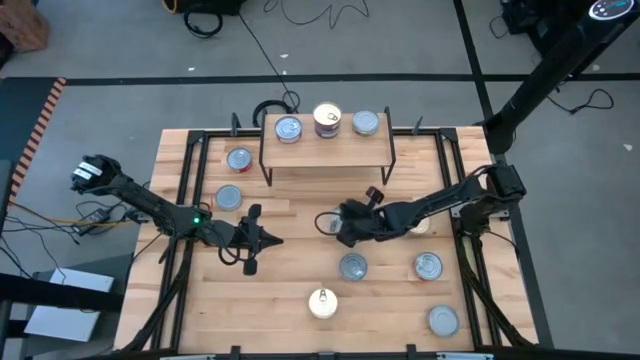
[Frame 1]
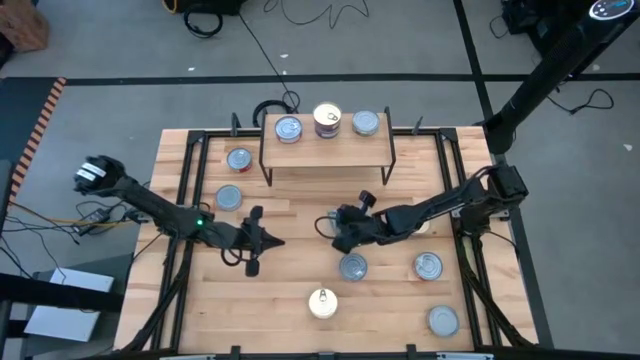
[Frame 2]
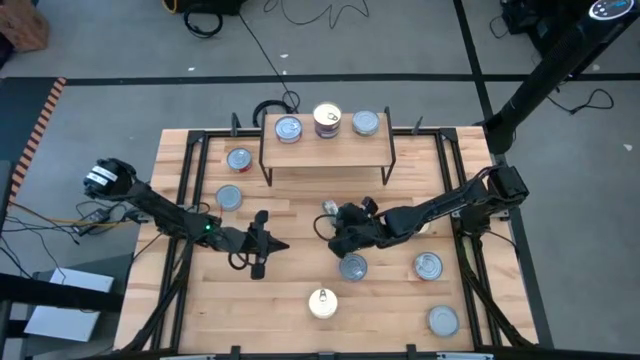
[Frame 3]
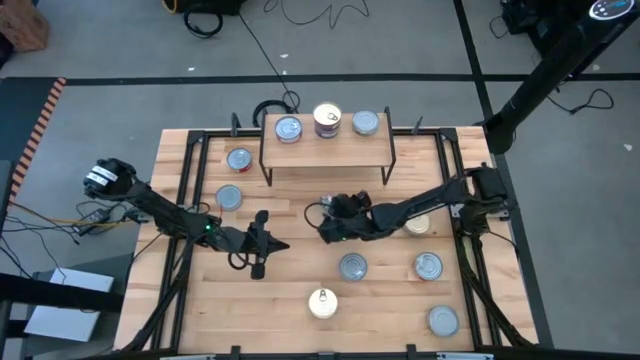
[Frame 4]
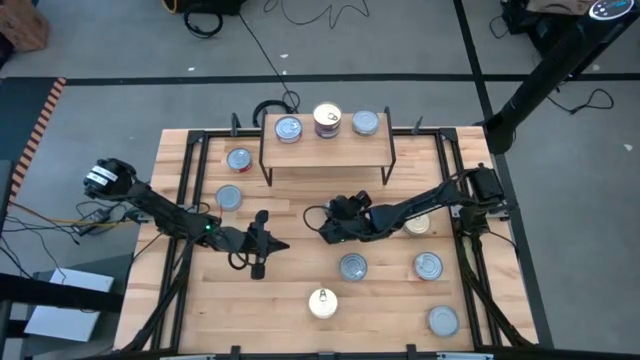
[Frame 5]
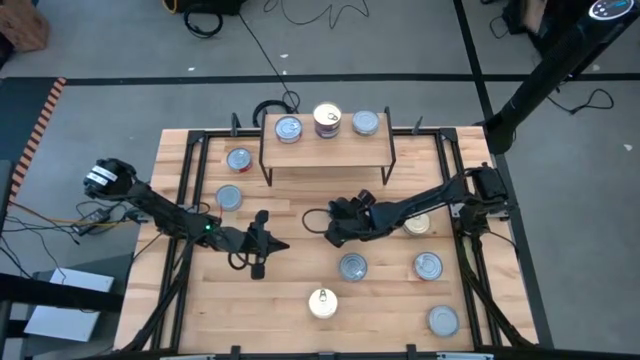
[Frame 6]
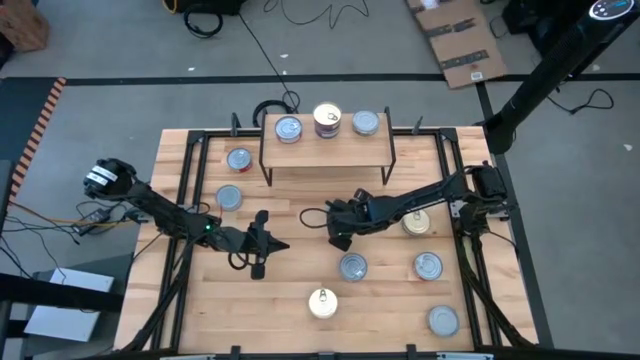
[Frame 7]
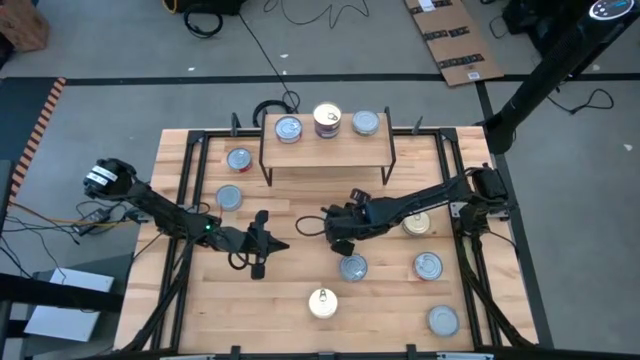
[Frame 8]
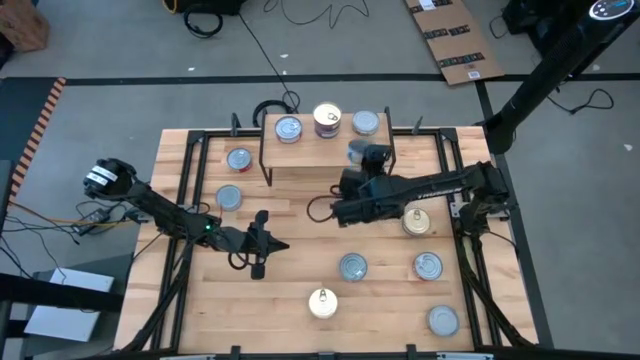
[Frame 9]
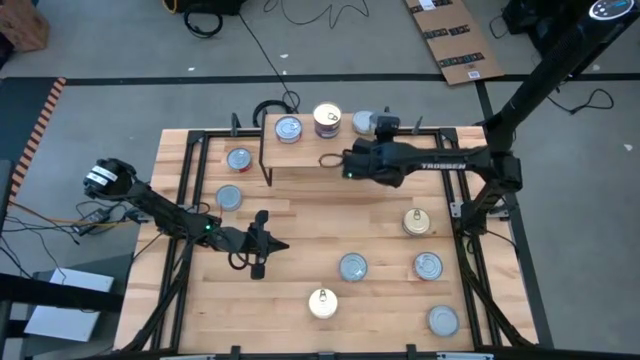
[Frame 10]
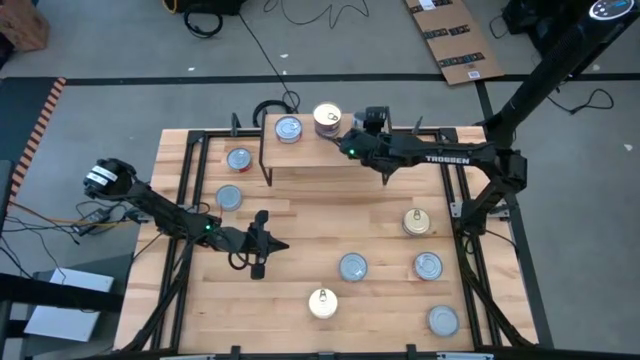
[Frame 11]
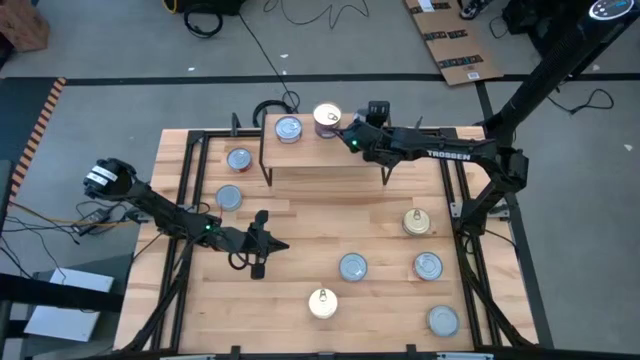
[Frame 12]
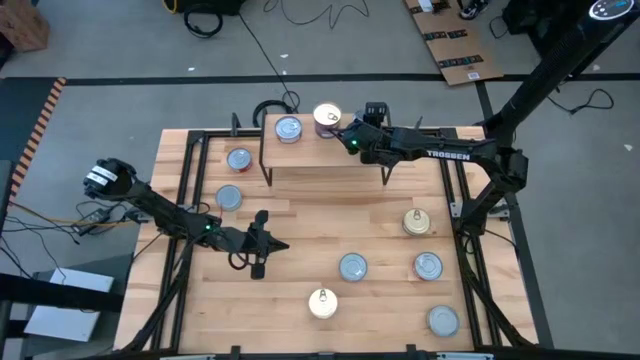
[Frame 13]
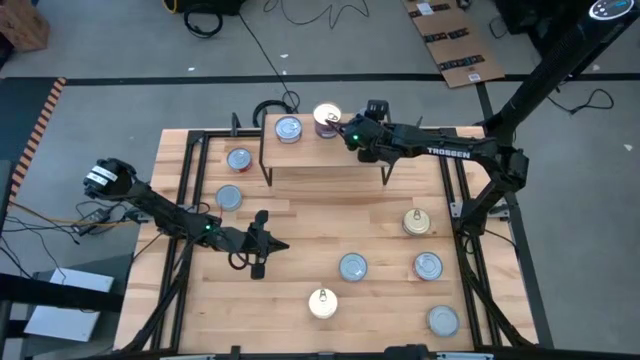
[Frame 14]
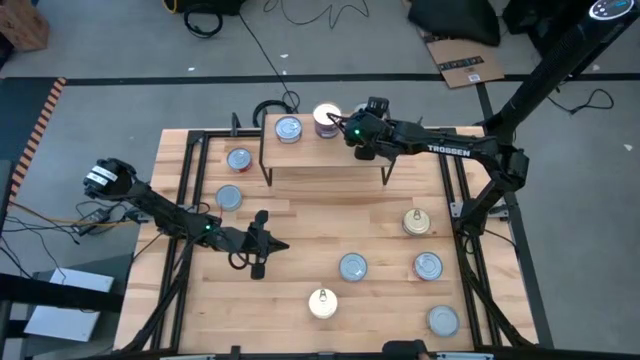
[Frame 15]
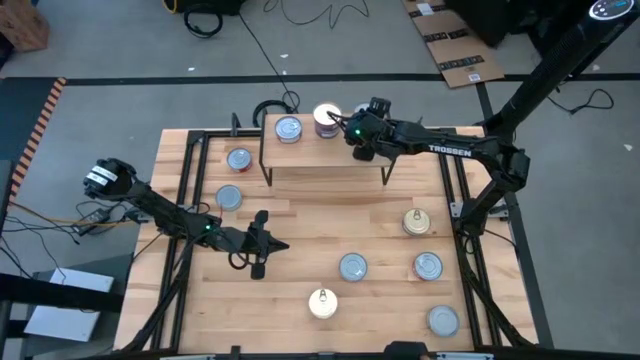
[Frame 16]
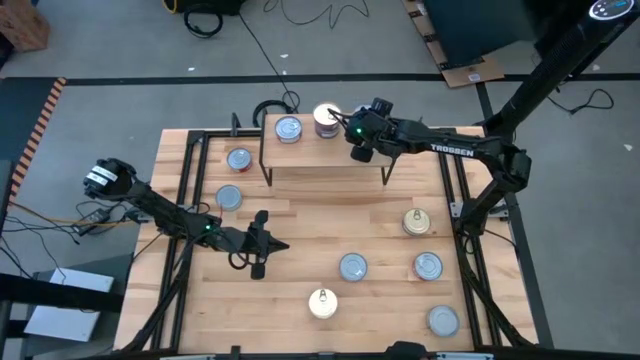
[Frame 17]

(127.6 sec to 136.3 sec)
Task: Stack canned seafood by type on shelf
Stack the green tuna can on top of the green tuna can on the shelf

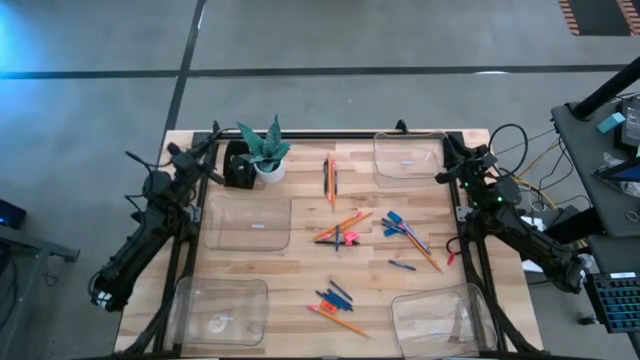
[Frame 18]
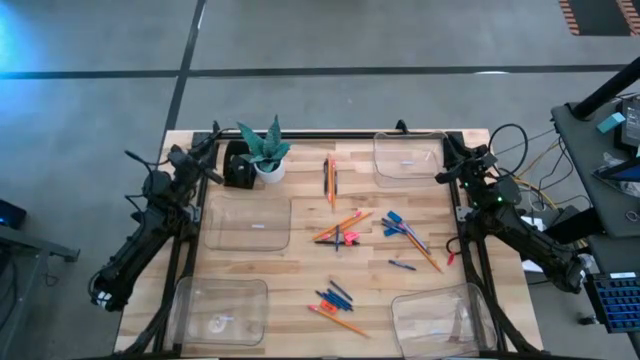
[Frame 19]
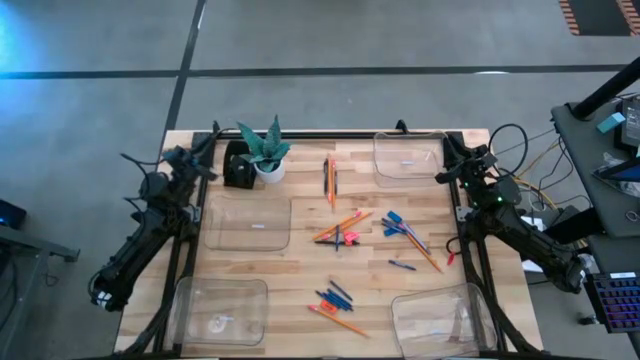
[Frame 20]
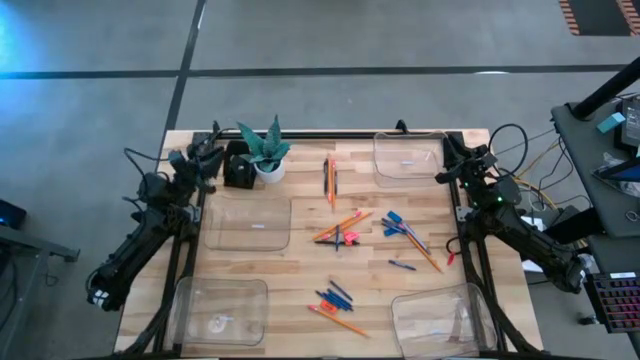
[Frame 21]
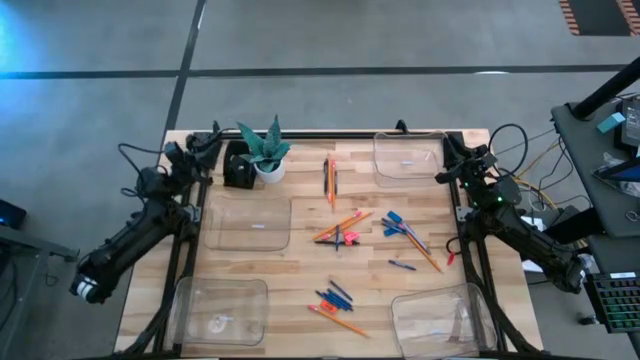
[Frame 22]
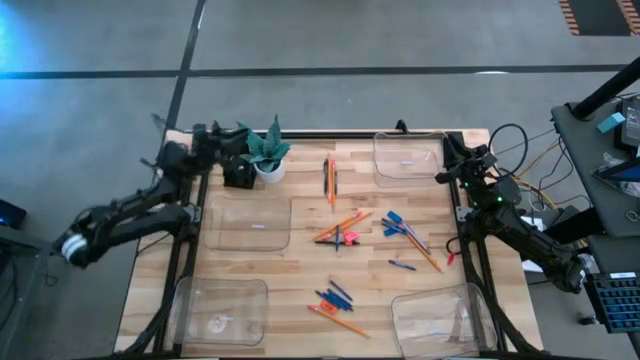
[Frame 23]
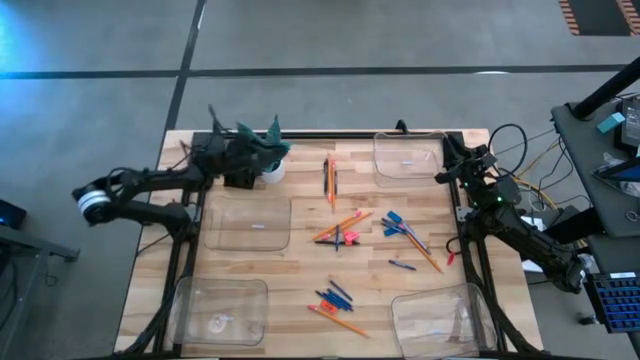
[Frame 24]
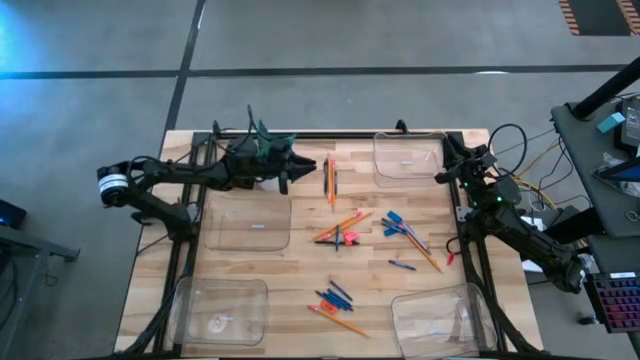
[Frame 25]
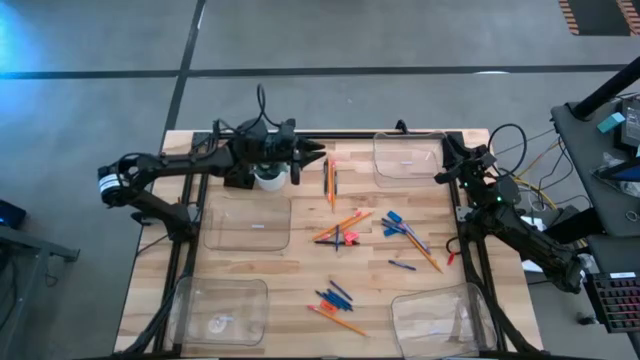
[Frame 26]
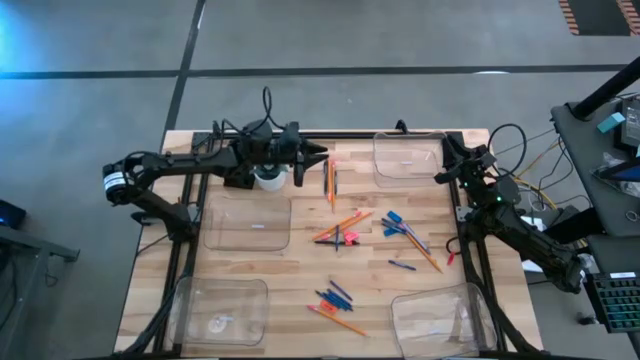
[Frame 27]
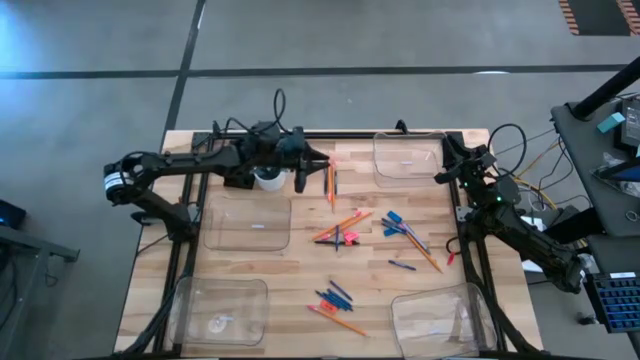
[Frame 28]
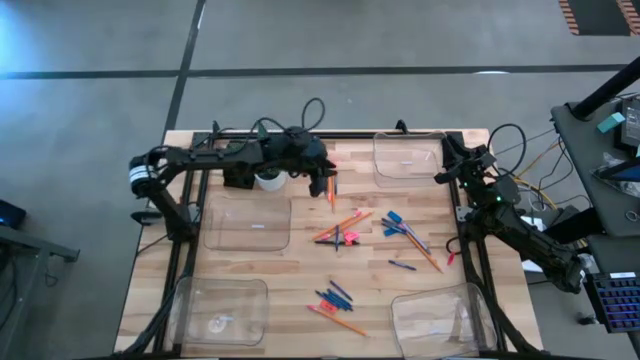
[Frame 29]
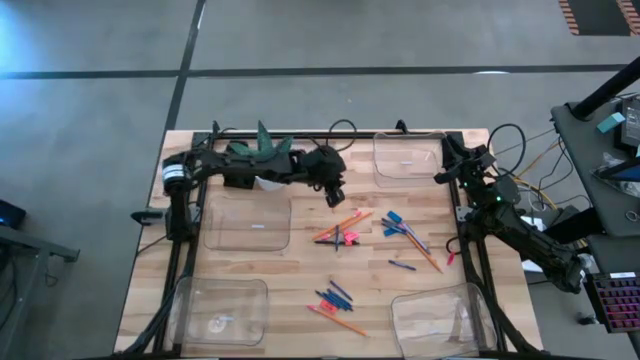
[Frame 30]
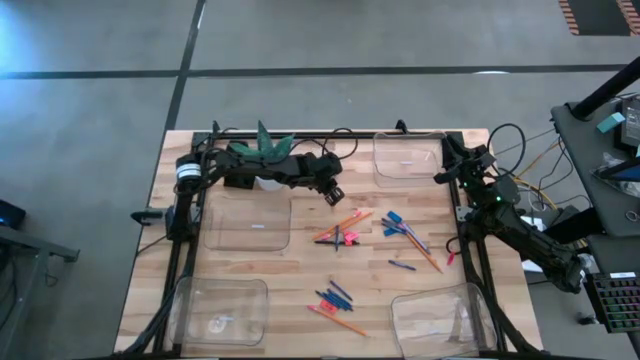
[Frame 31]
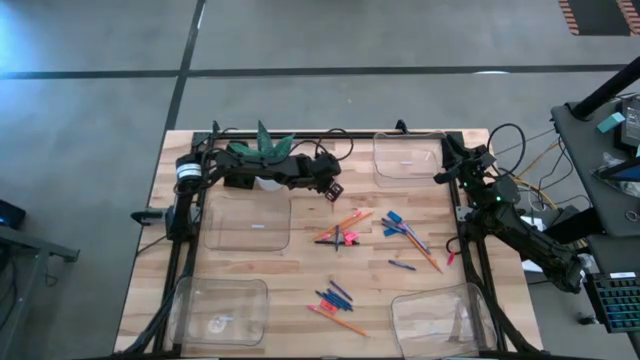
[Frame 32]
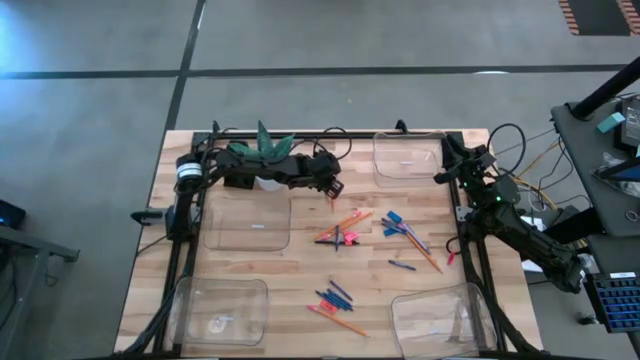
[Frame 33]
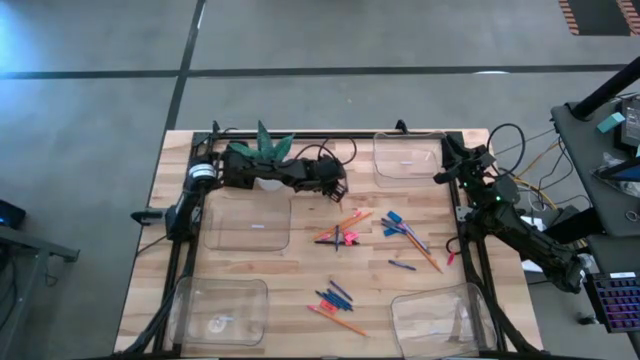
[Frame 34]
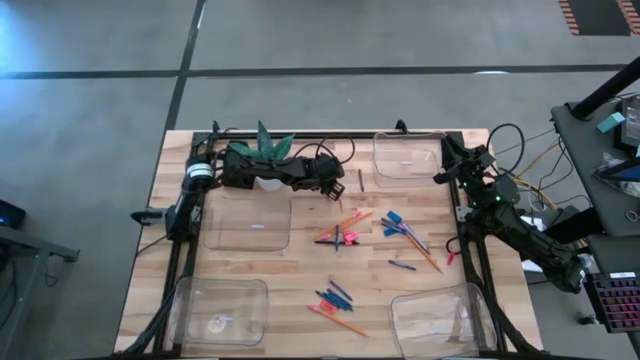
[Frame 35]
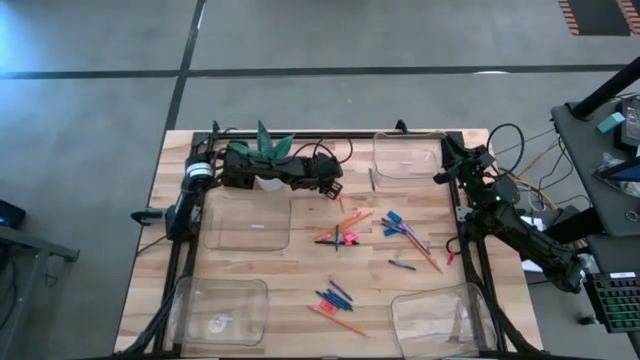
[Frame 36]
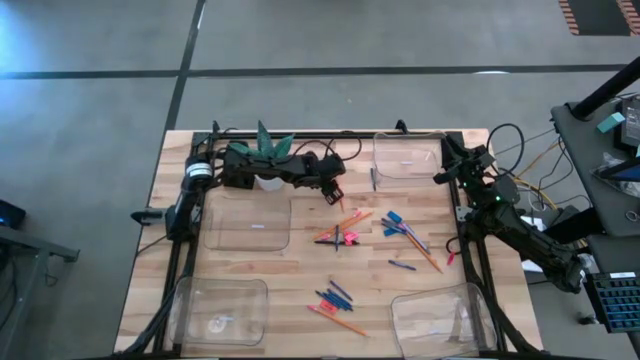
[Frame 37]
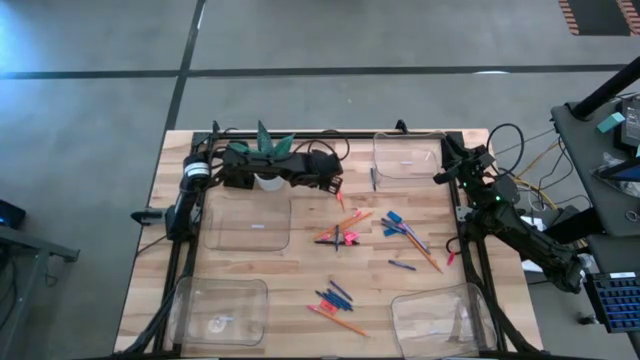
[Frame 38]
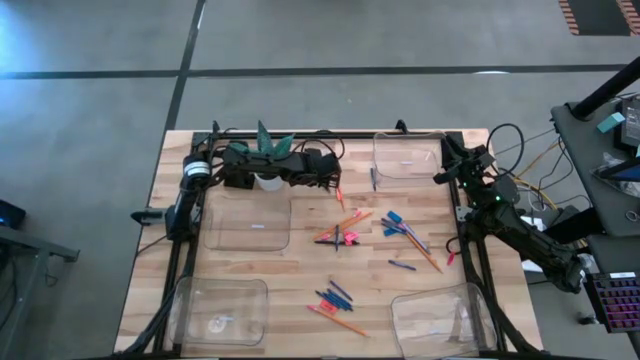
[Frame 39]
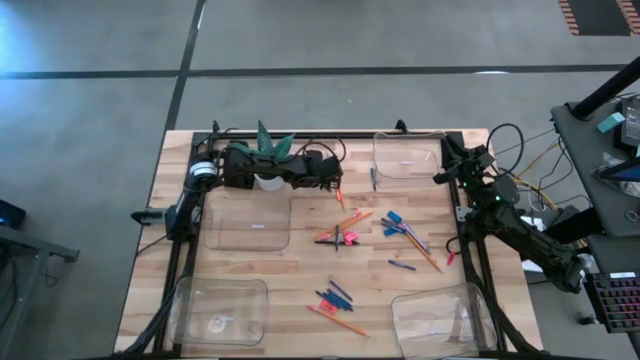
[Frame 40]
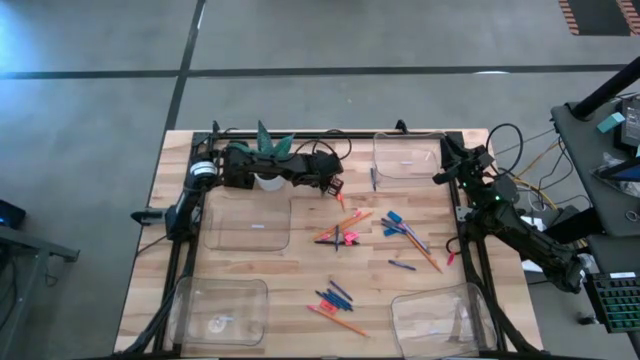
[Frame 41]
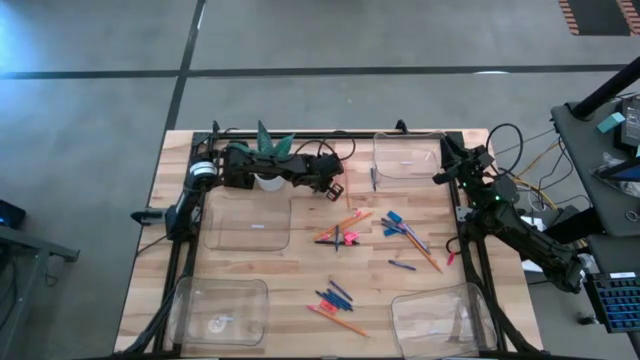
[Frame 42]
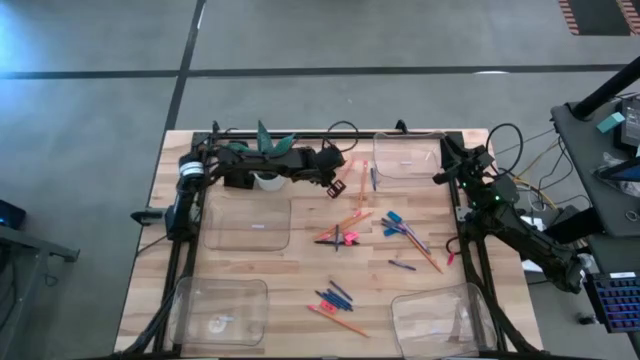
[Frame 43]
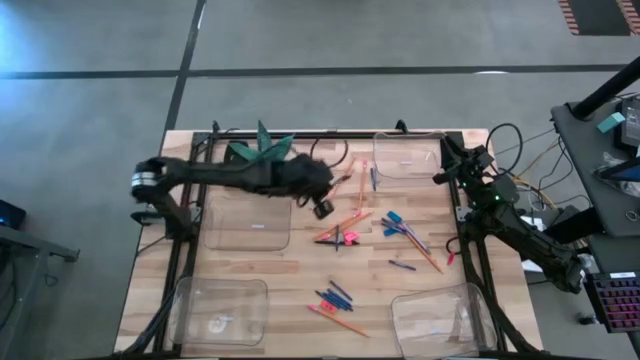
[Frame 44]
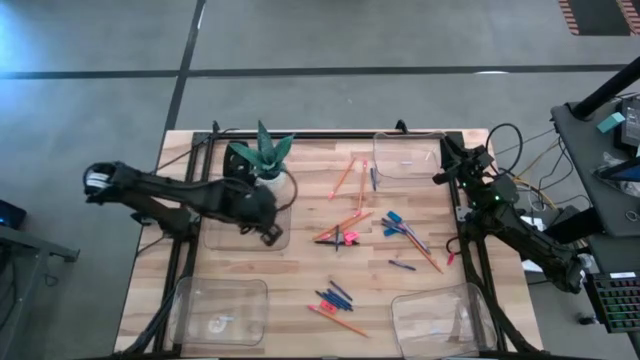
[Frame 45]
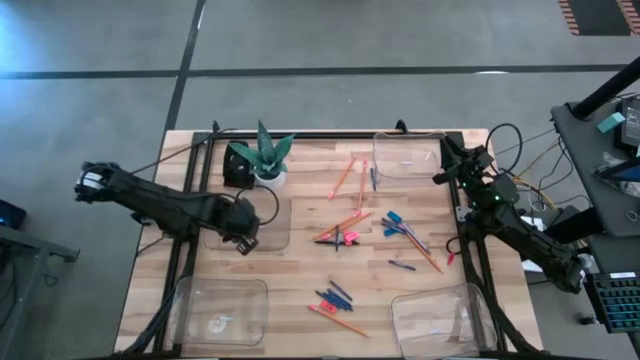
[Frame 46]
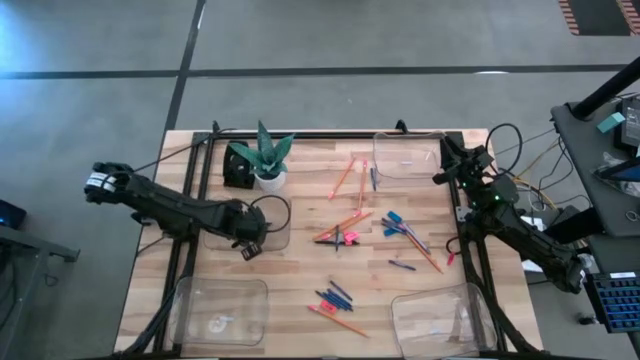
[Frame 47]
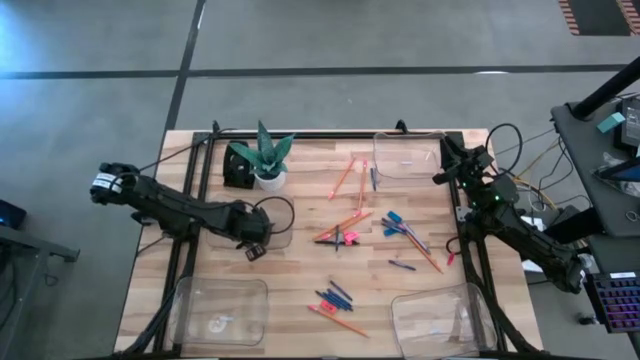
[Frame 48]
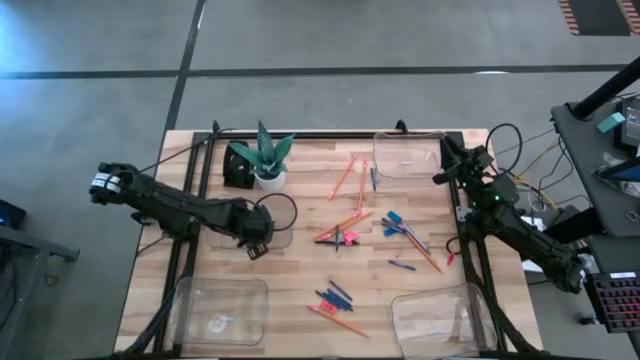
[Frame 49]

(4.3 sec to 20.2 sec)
Task: Sort crayons/erasers/pens/pencils in bins
Put the top black pen into the middle left transparent bin
